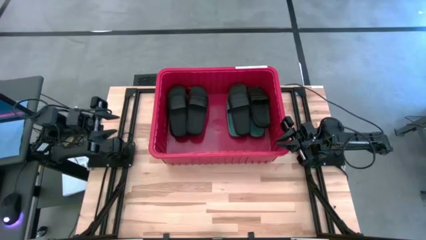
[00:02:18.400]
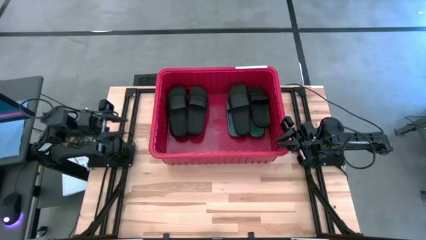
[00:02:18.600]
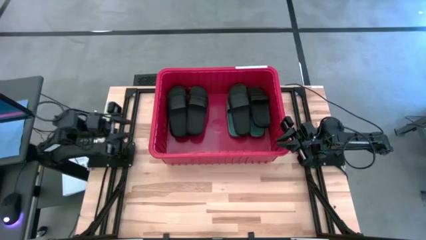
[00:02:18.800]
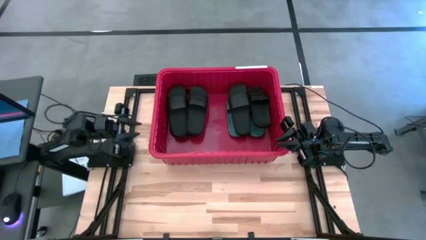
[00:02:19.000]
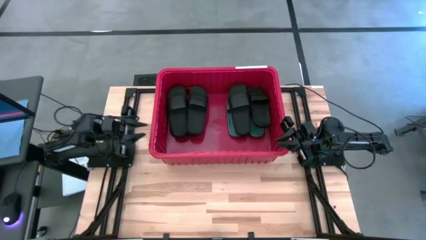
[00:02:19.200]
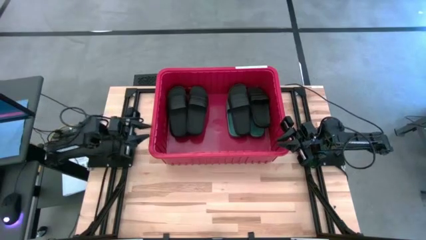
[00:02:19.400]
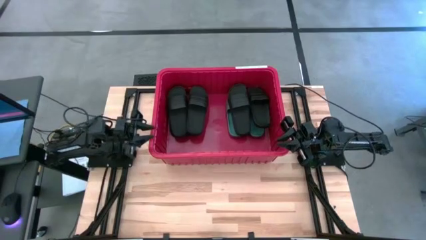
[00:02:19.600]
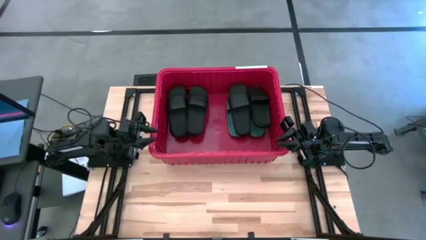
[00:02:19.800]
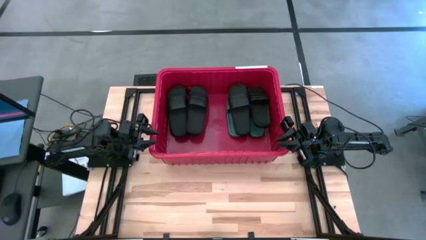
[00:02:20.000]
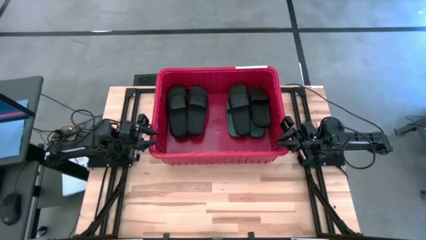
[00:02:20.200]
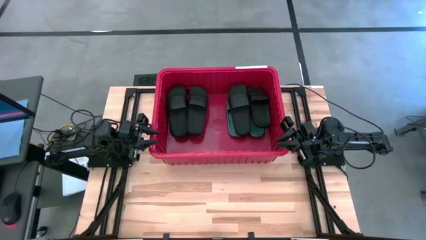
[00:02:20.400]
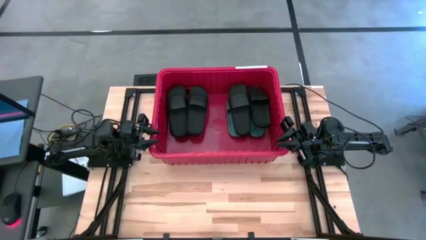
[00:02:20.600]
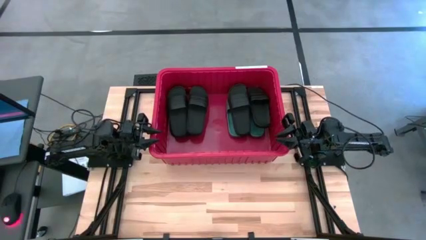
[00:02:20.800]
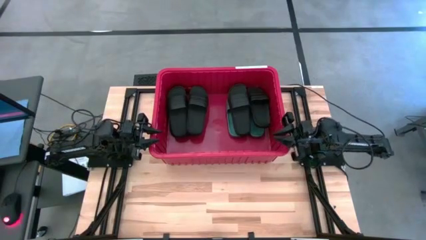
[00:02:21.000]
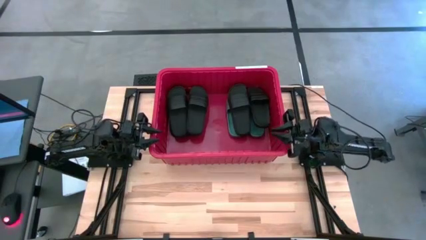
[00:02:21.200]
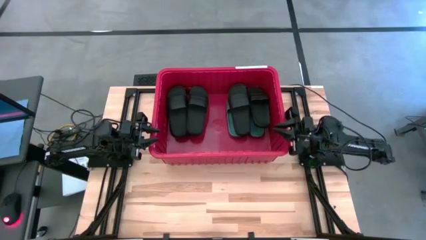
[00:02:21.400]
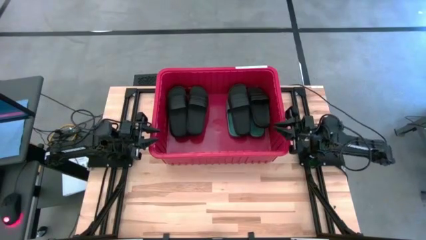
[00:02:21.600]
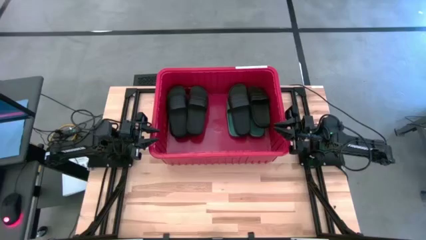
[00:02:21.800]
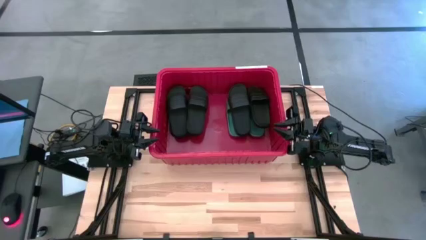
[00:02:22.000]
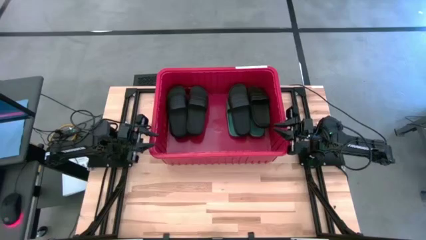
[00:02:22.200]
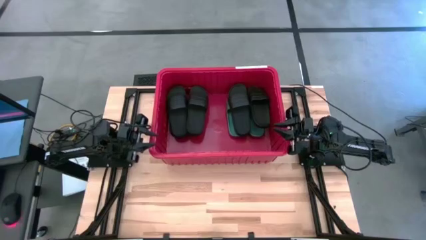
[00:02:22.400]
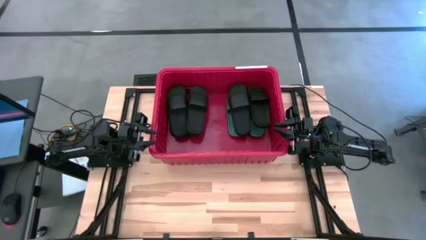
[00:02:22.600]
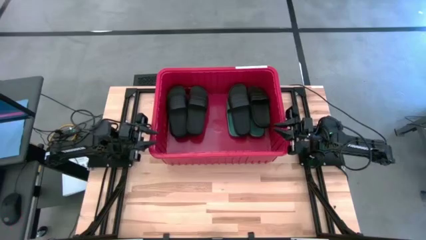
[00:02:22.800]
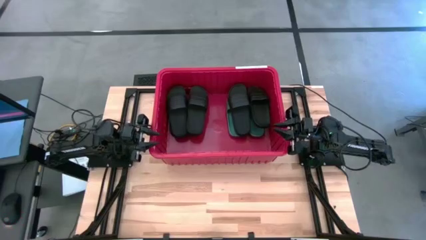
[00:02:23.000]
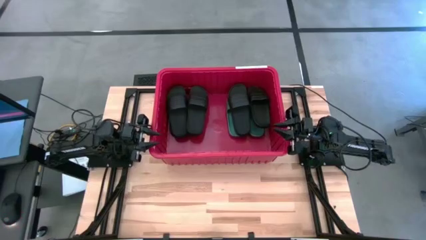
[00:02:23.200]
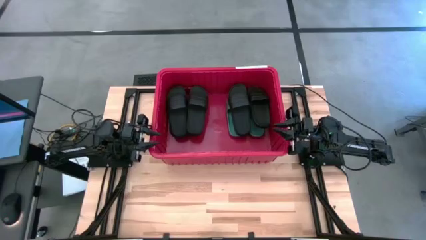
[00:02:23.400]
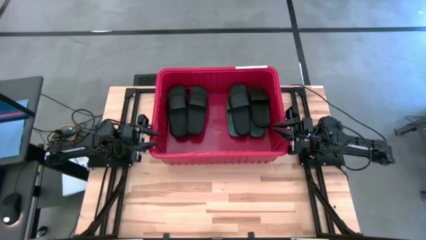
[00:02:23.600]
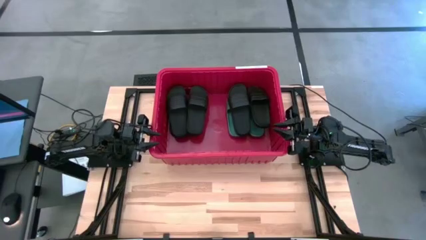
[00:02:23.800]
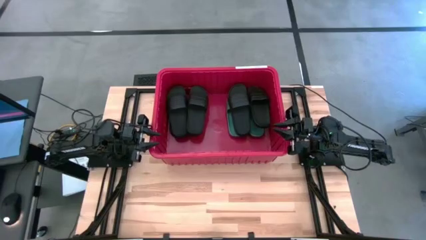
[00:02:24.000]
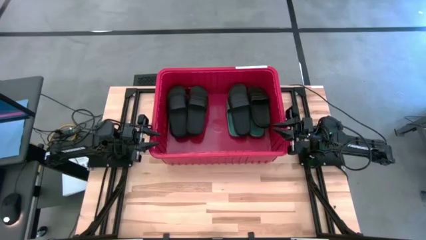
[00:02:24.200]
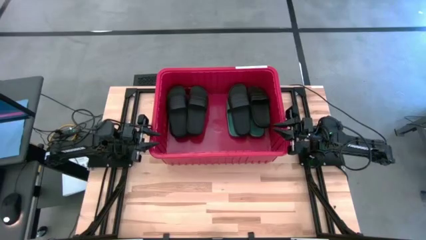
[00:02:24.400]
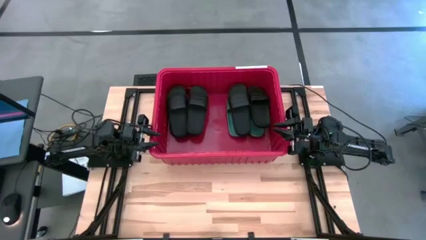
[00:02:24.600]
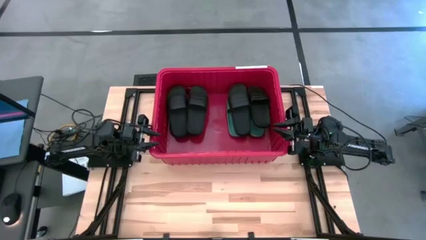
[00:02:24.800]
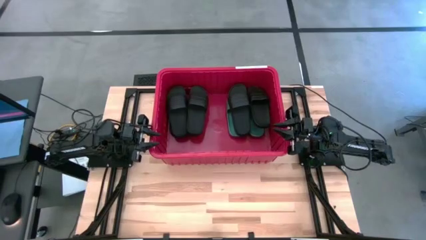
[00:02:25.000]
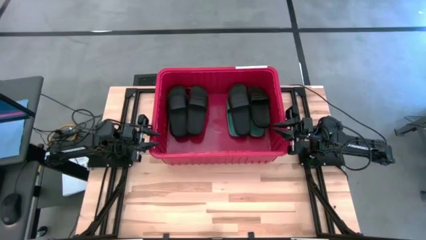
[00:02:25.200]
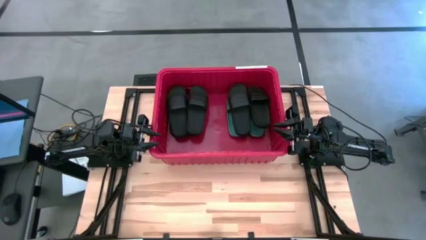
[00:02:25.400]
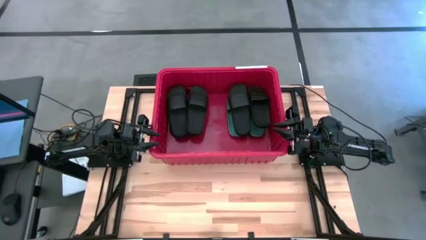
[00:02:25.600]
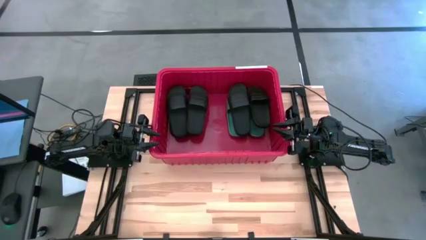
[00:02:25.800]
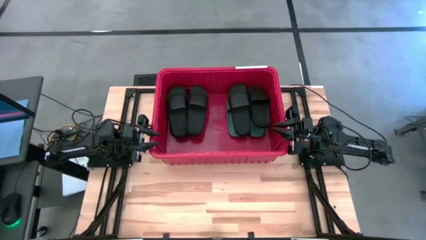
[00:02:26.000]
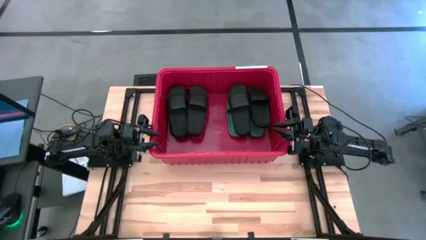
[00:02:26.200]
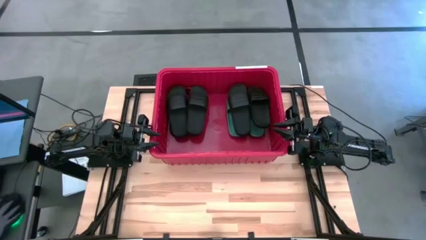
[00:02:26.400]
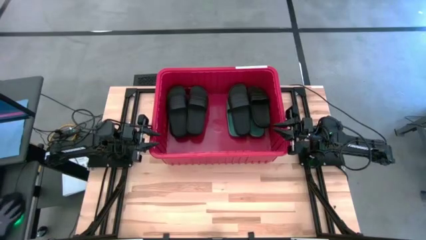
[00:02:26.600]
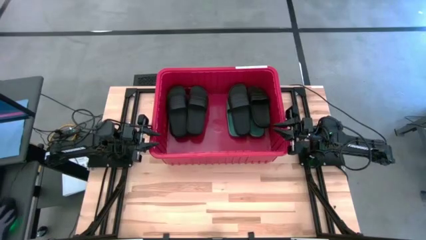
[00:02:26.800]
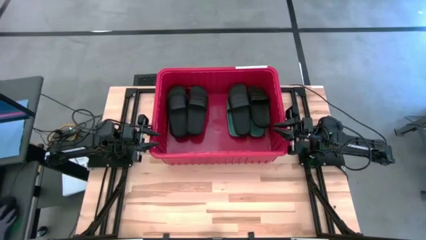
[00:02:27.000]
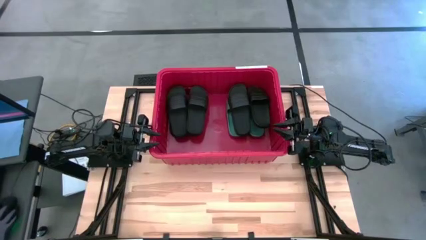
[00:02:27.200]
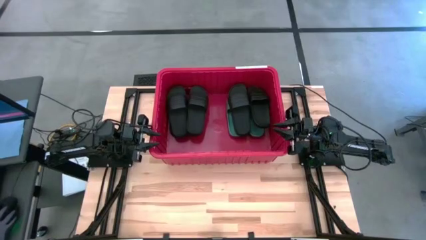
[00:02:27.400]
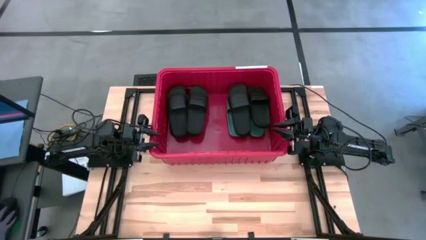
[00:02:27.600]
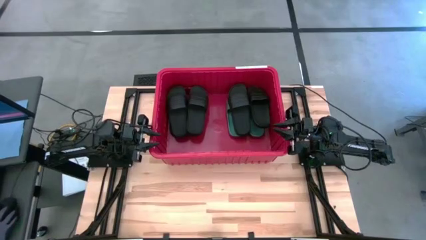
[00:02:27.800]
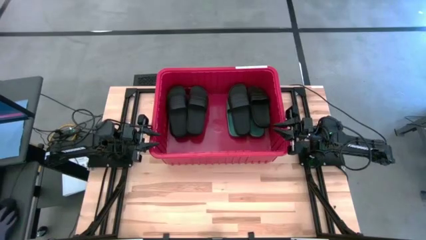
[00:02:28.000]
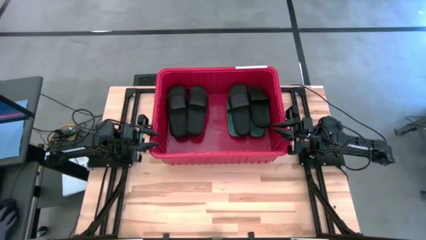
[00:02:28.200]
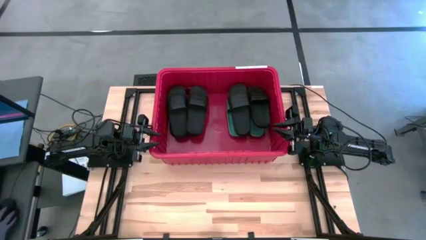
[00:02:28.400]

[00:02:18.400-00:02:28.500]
Task: Pick and place slides into bin
Return to Home Position

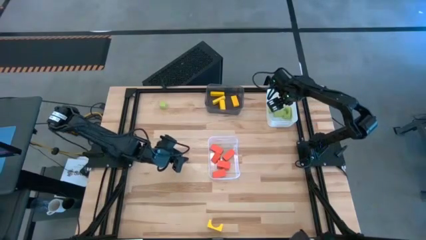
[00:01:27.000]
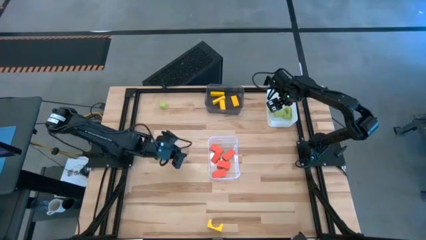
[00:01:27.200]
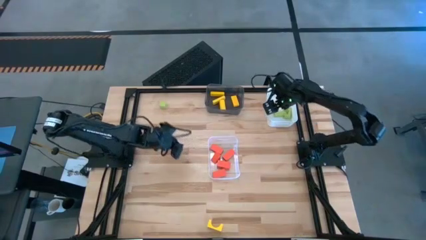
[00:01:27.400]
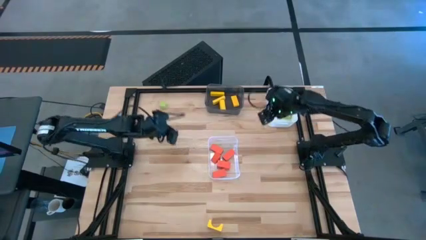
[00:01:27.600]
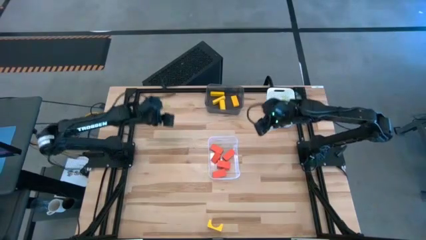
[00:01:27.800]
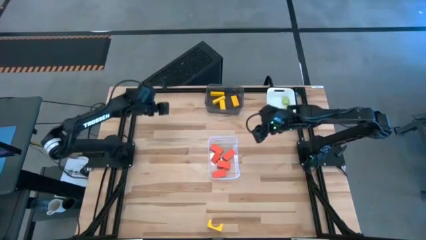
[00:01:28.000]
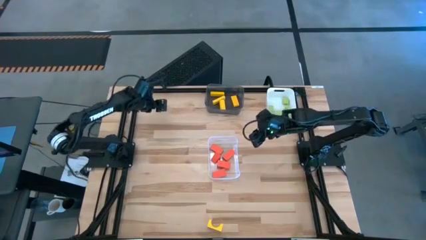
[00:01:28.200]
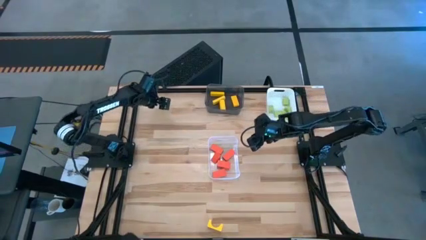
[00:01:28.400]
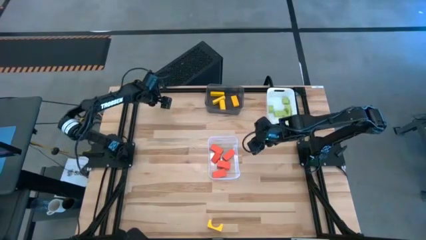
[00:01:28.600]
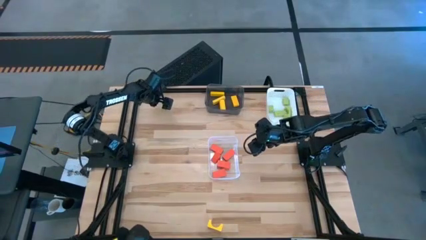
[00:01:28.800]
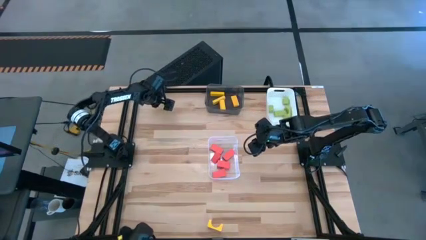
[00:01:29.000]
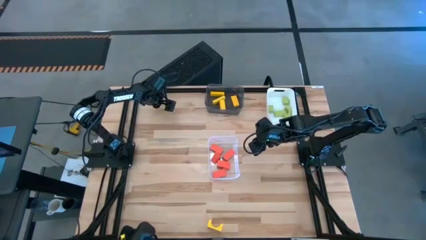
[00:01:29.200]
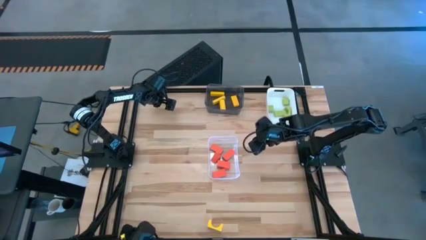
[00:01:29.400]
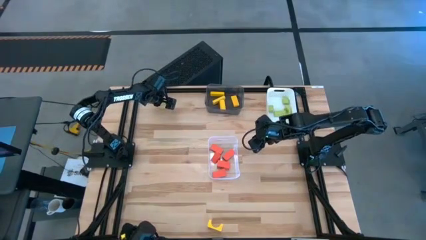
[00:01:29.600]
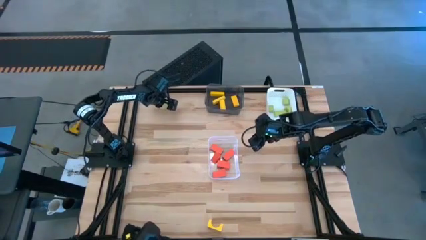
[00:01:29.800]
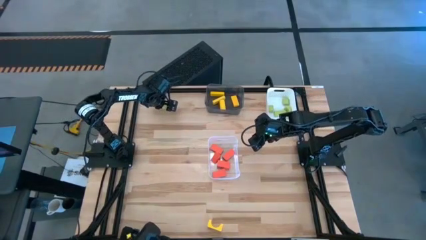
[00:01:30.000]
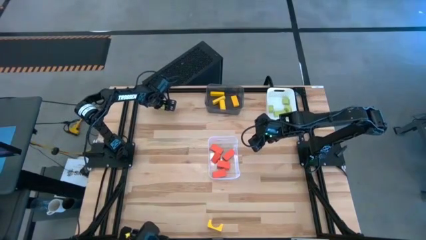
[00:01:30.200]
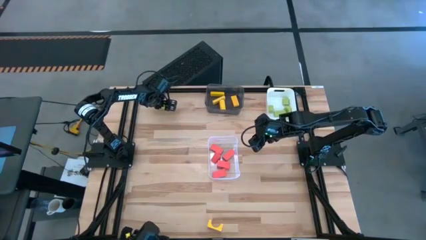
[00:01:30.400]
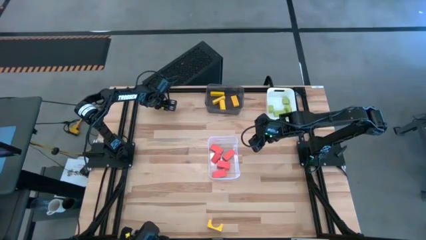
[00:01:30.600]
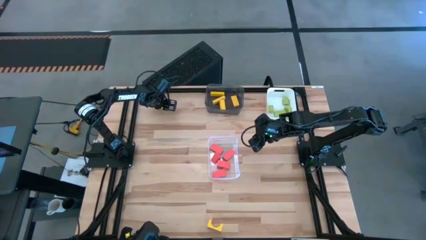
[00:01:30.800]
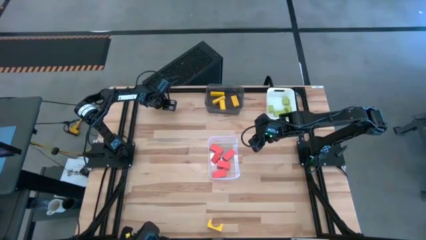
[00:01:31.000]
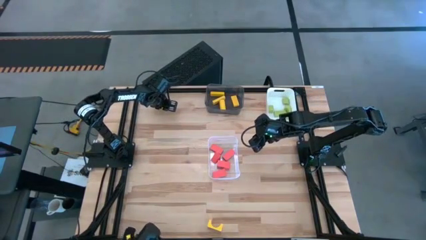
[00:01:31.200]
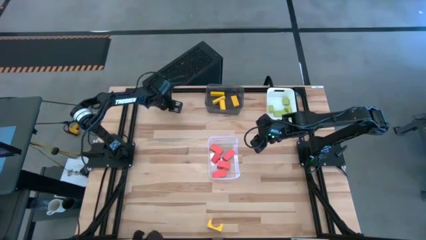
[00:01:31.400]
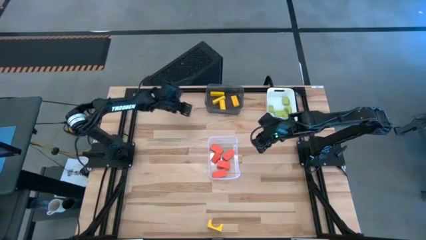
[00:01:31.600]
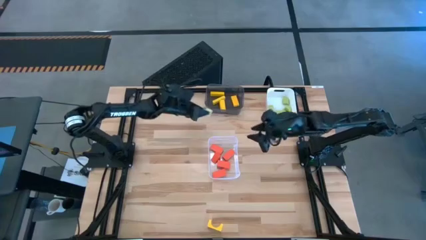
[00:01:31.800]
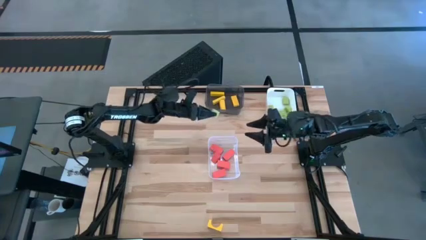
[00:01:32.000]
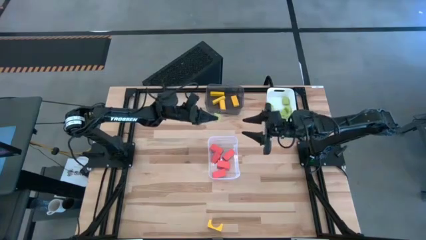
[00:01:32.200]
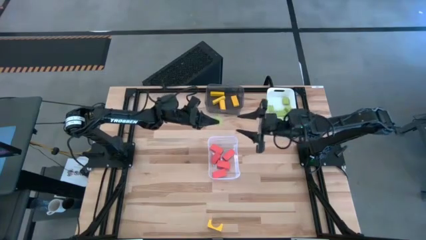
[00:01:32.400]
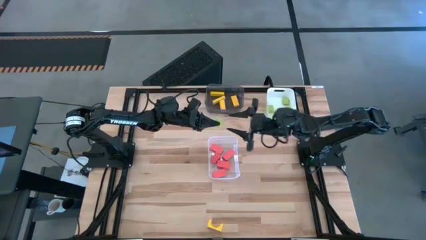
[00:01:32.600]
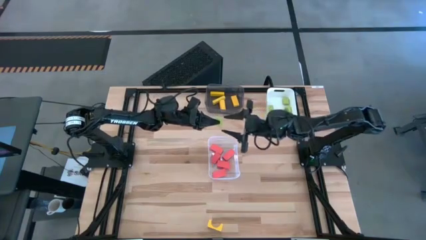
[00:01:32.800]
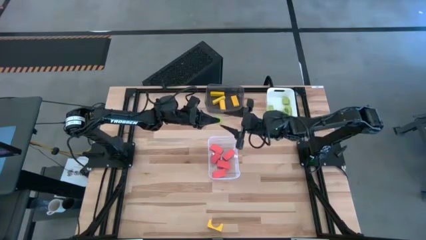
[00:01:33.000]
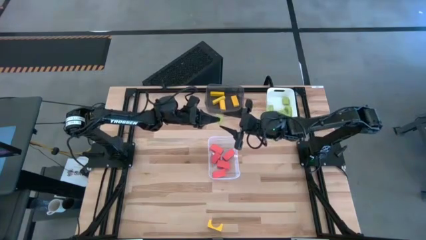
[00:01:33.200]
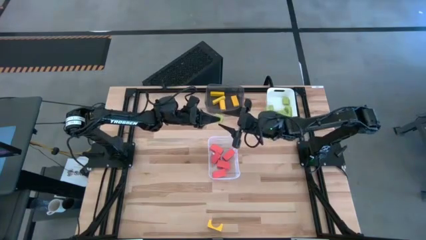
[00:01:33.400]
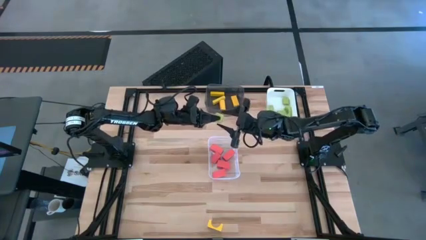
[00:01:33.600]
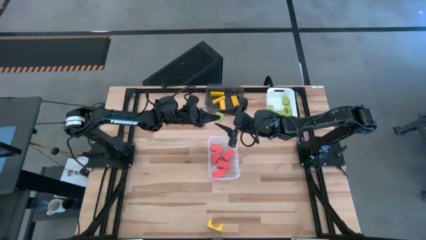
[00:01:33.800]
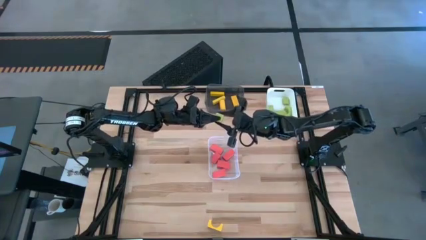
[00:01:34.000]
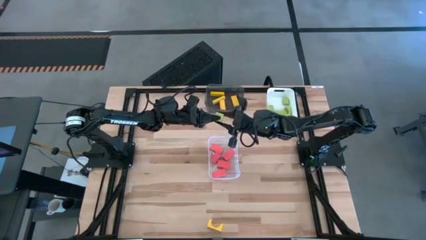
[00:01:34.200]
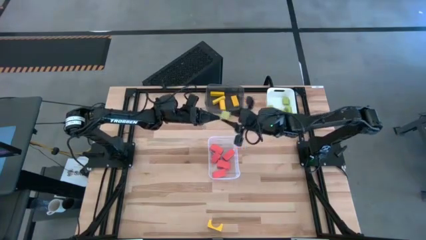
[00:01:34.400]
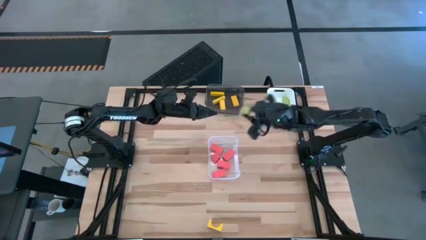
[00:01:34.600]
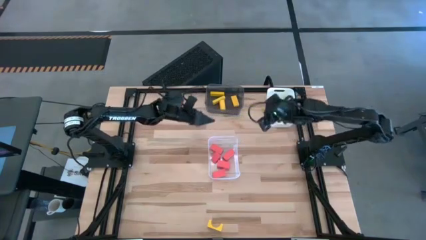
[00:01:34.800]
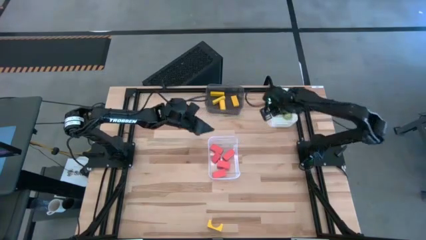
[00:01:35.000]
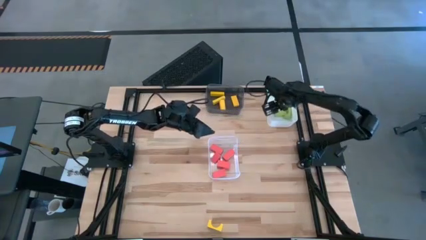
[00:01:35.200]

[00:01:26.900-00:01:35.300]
Task: Sort & place blocks by color
Put the green block into the white bin
